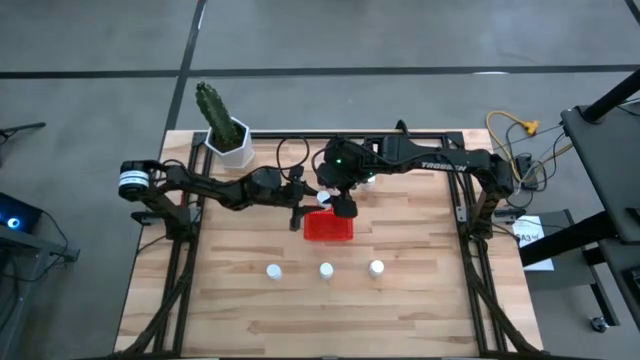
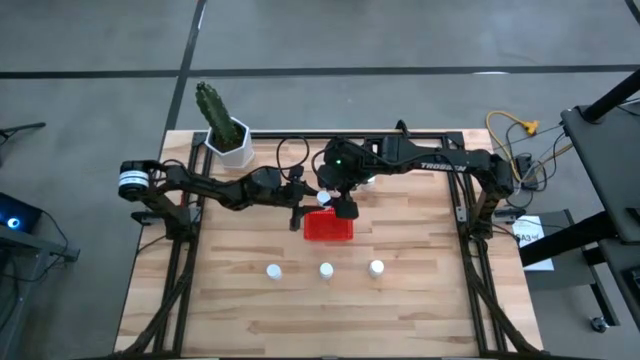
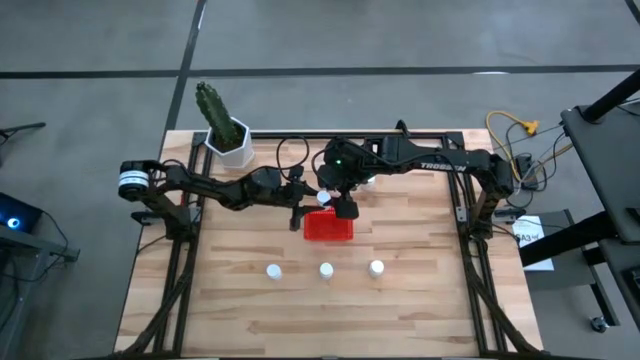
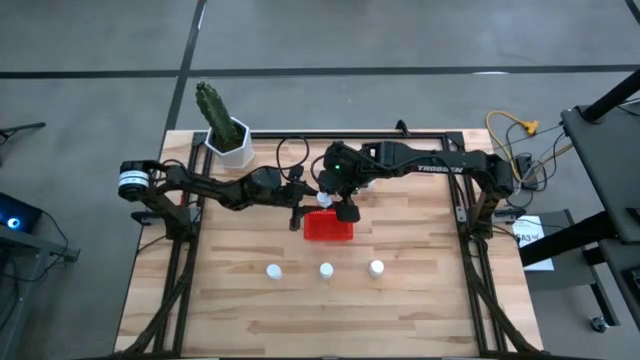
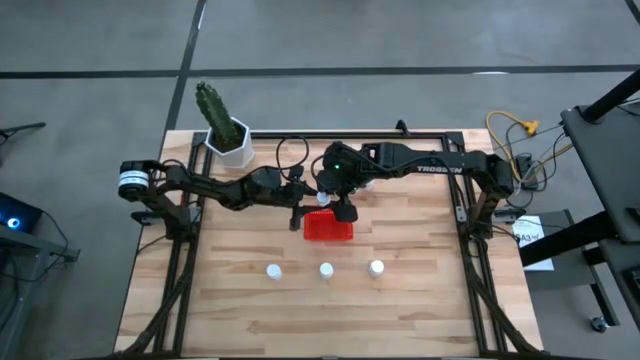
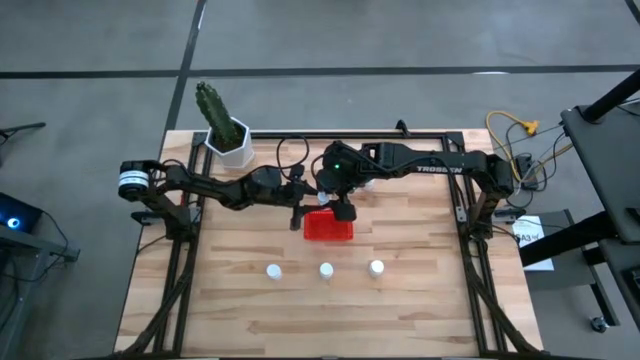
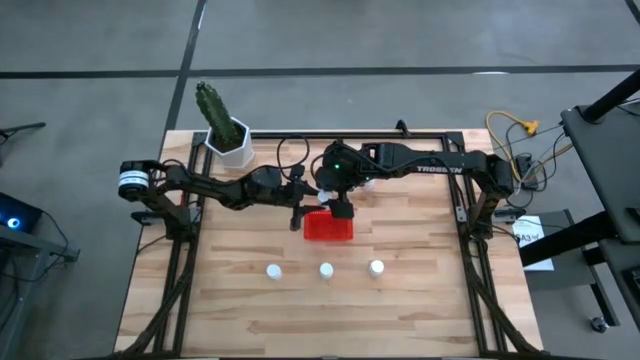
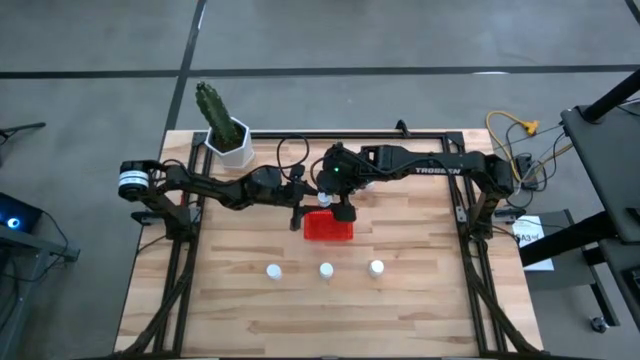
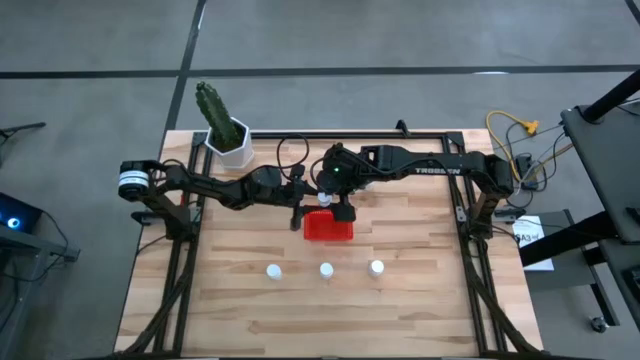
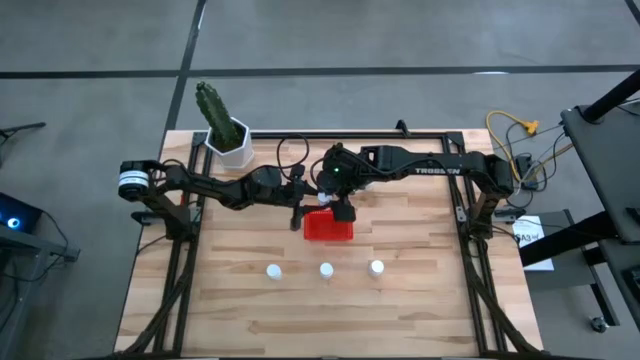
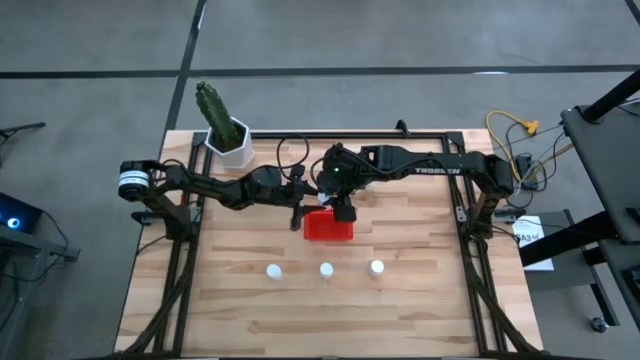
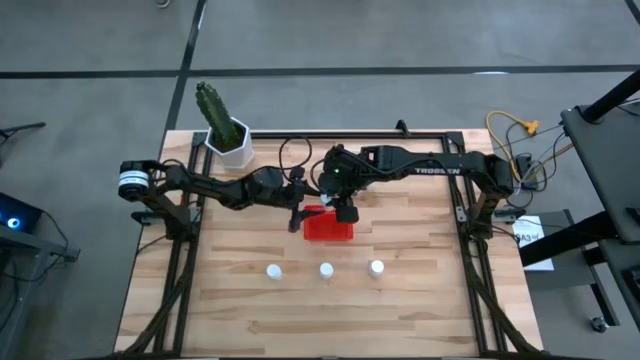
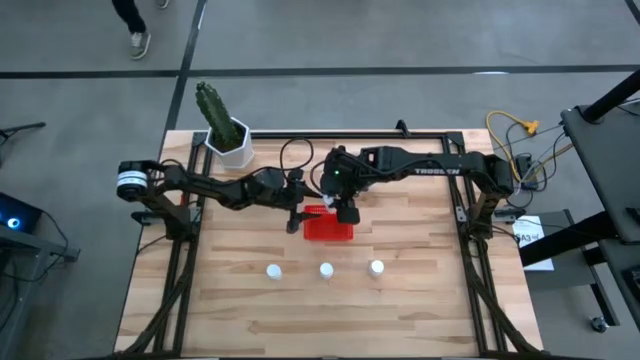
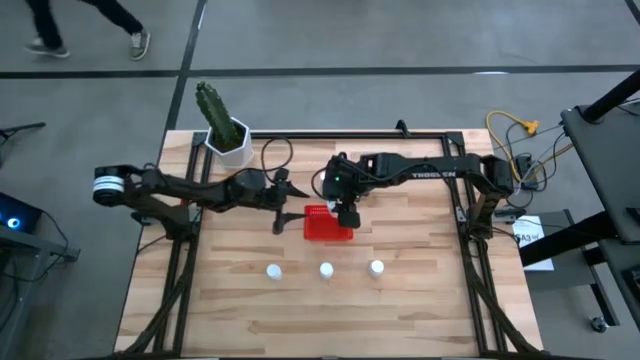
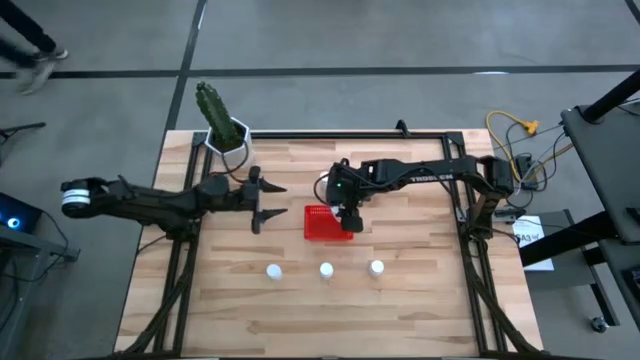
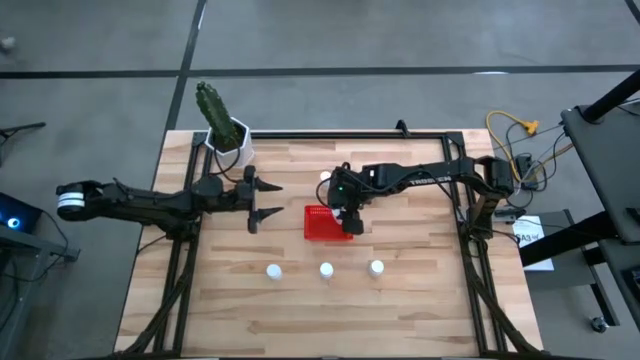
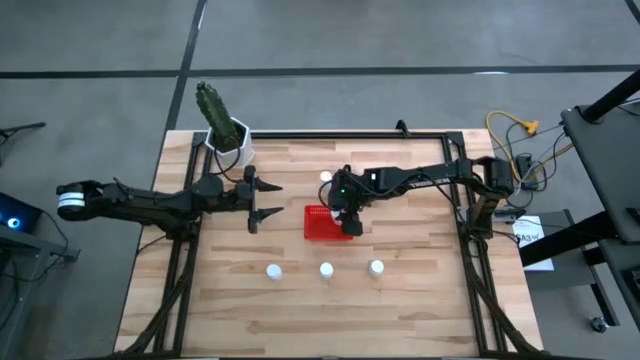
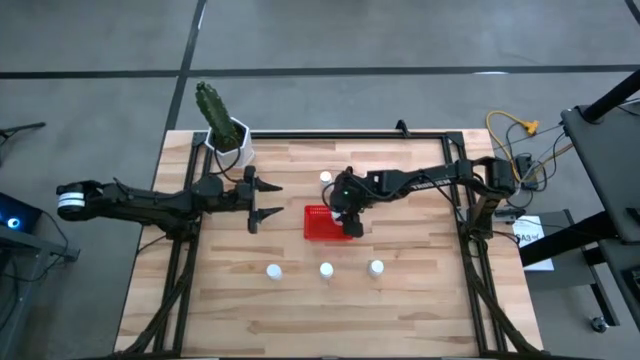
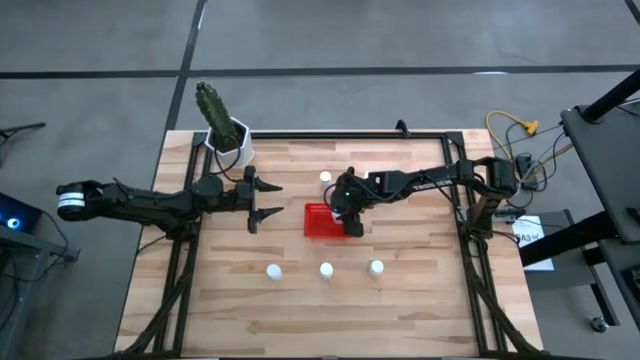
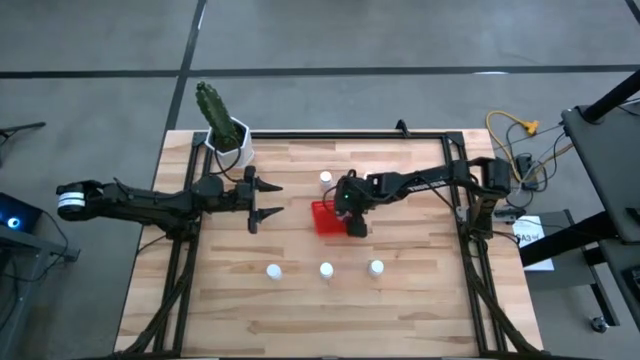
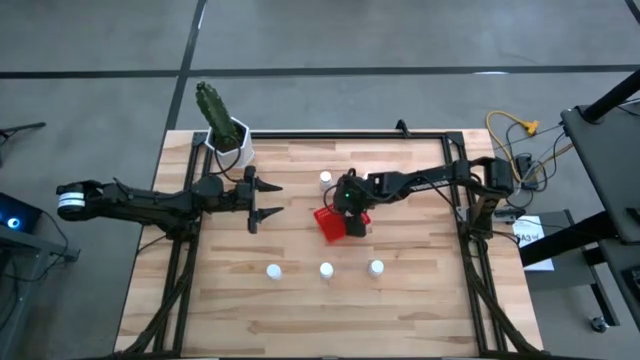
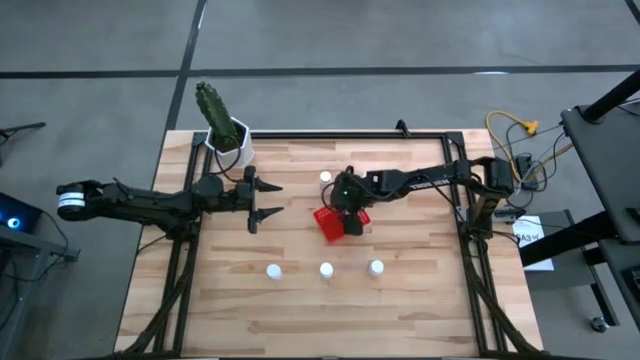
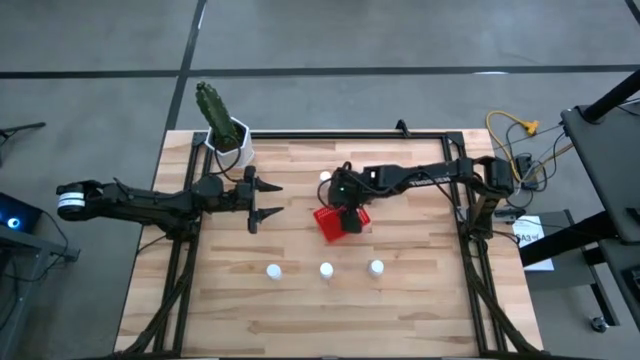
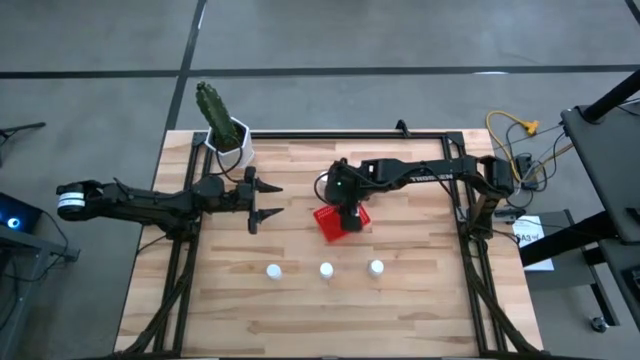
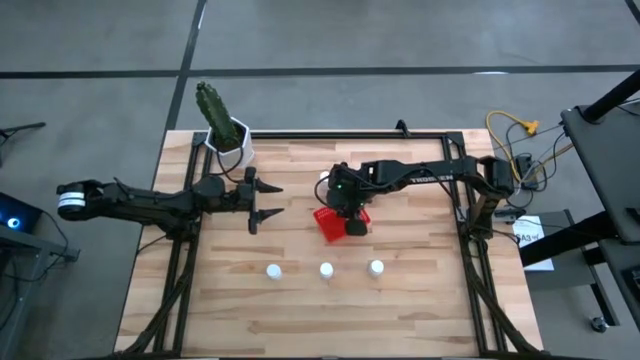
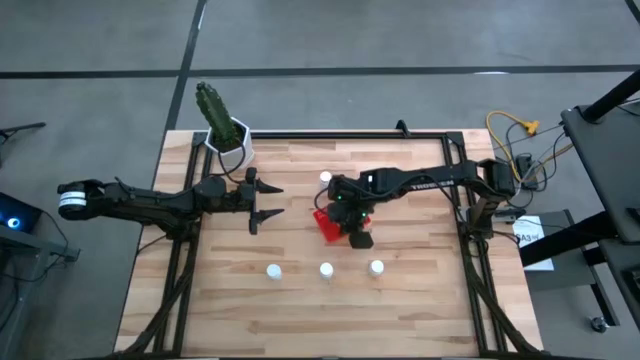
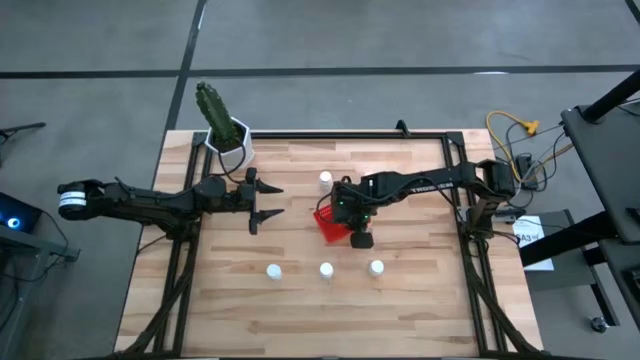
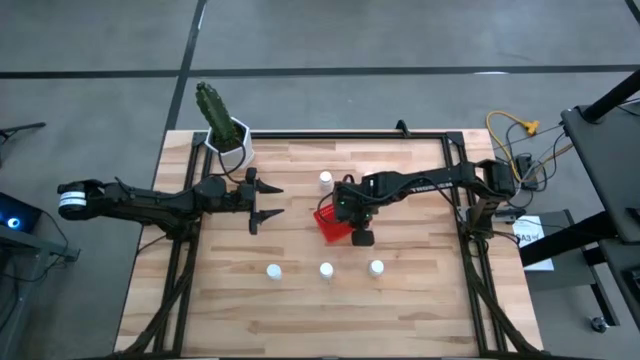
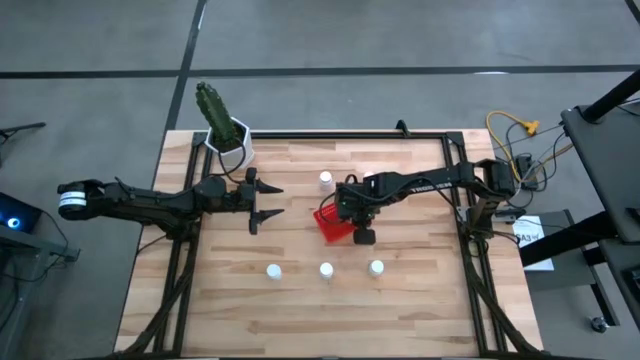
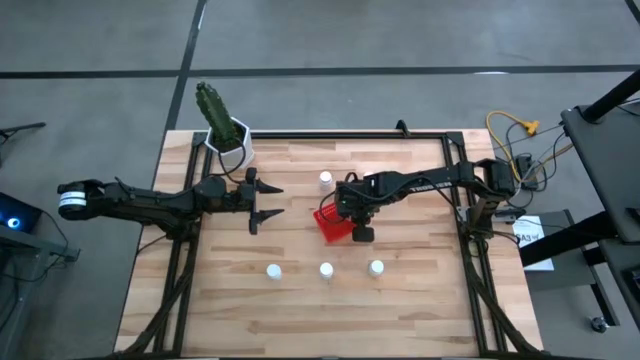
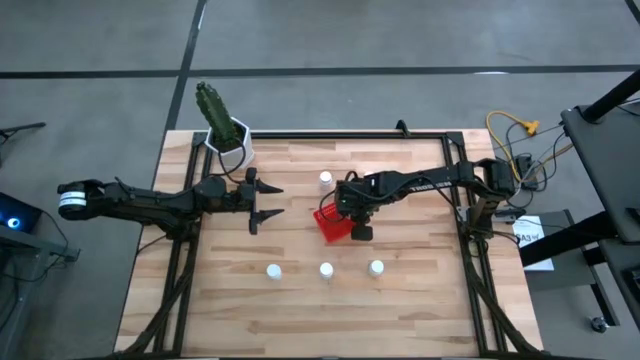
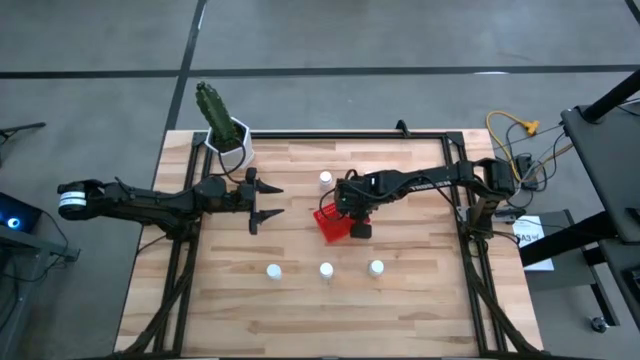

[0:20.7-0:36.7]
Task: Pick and place pill bottles into a basket
Put the white pill bottle into the red bin
